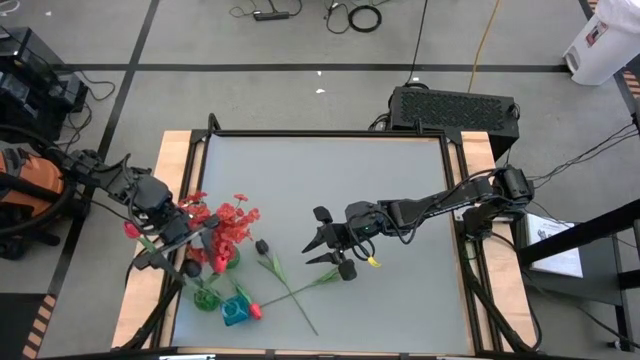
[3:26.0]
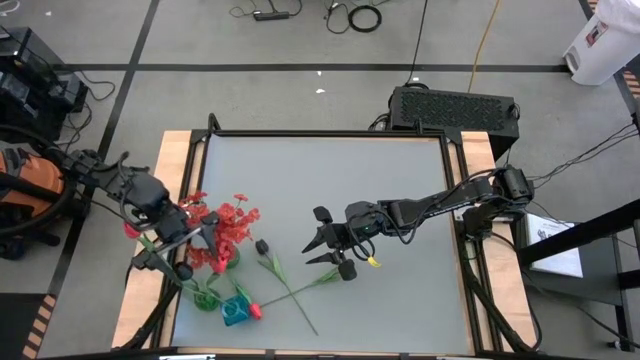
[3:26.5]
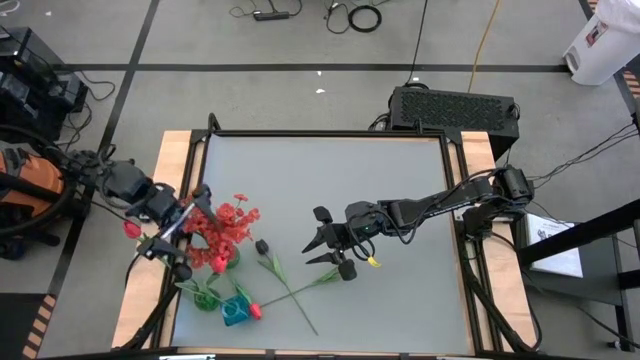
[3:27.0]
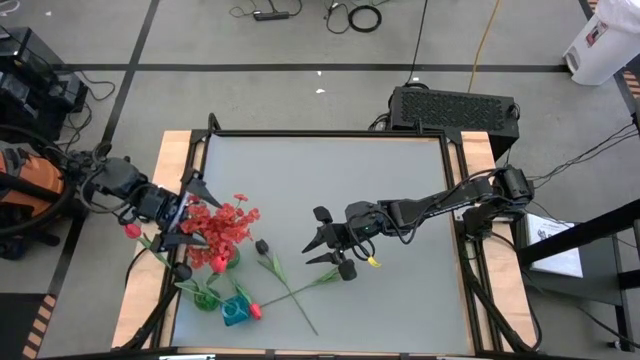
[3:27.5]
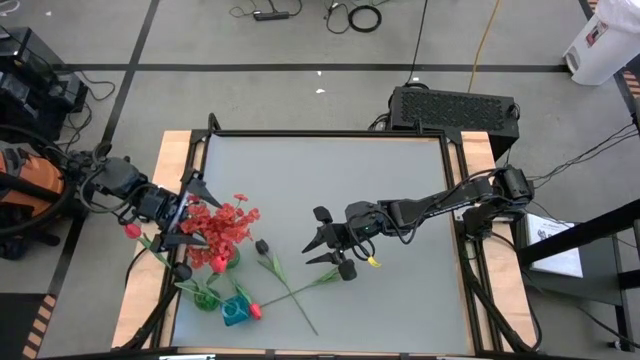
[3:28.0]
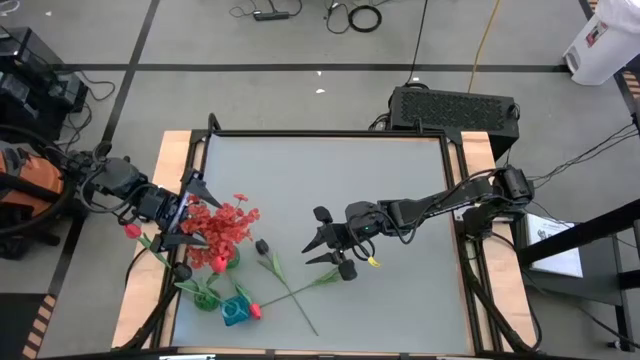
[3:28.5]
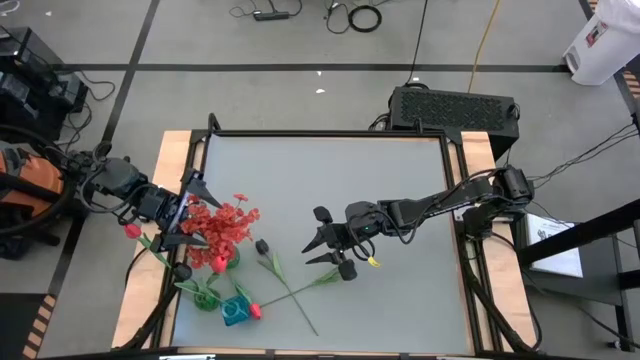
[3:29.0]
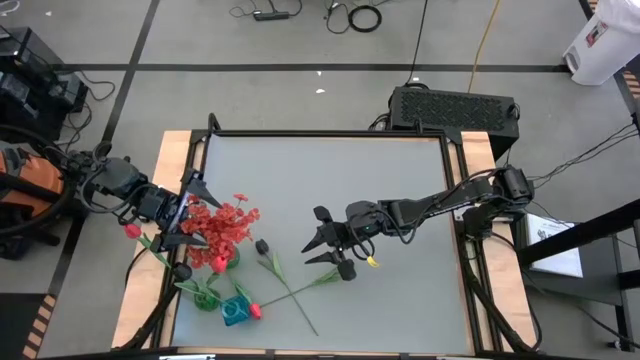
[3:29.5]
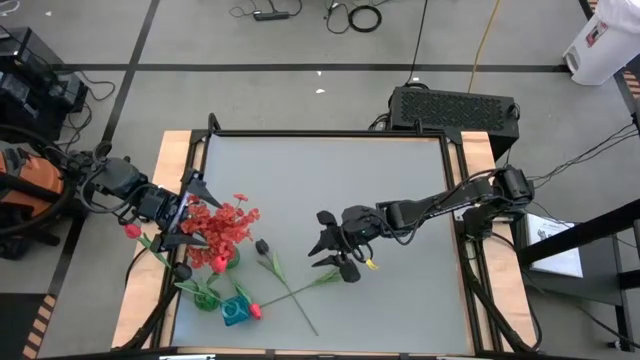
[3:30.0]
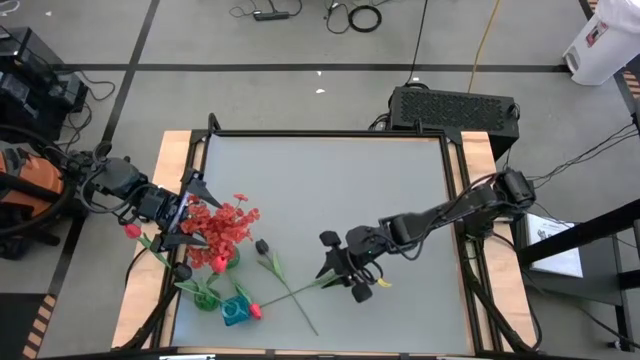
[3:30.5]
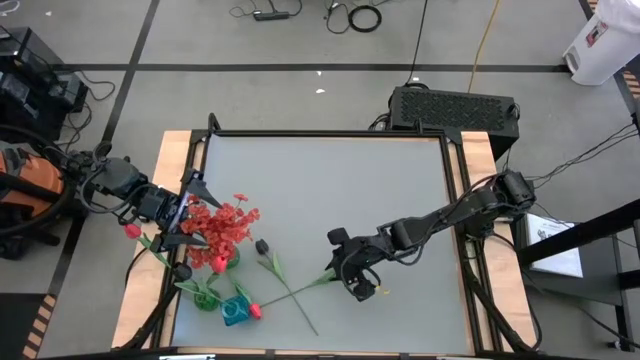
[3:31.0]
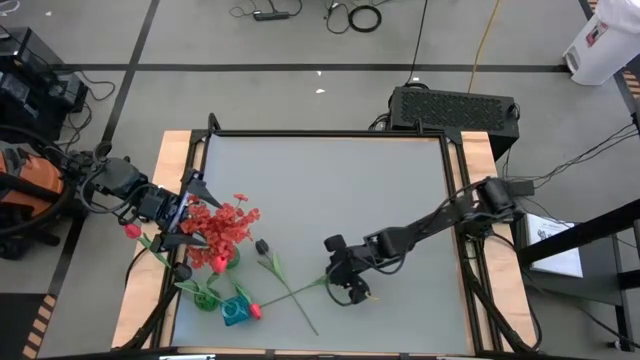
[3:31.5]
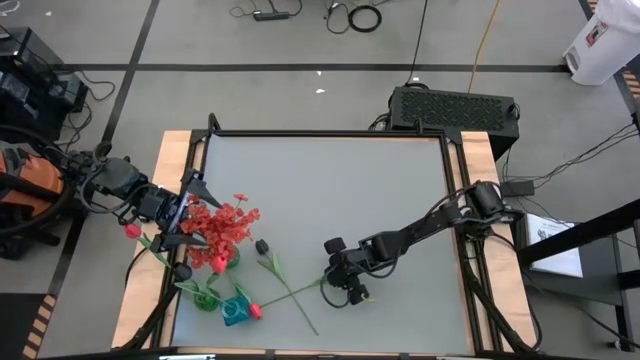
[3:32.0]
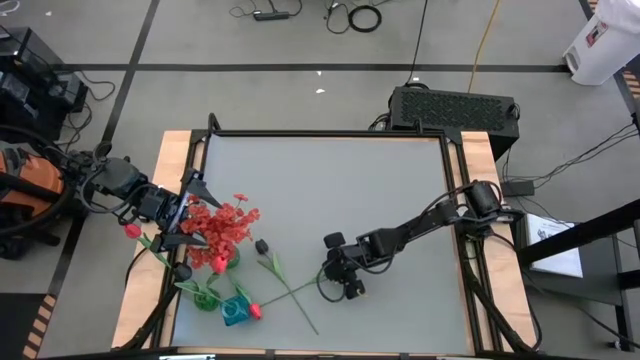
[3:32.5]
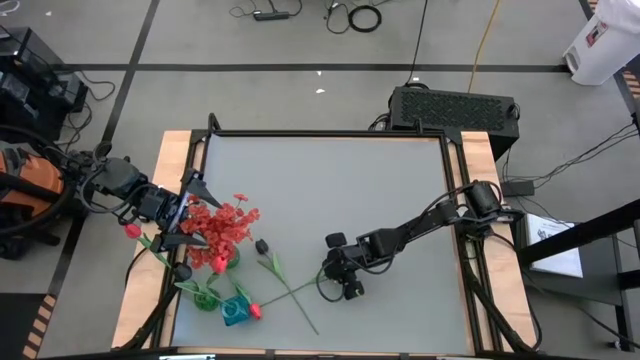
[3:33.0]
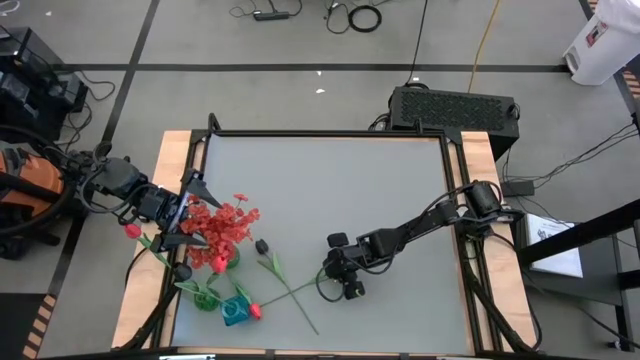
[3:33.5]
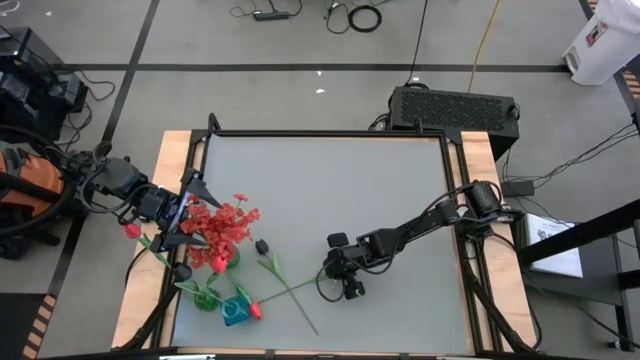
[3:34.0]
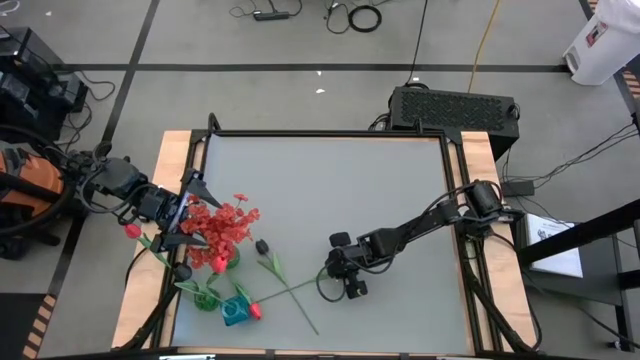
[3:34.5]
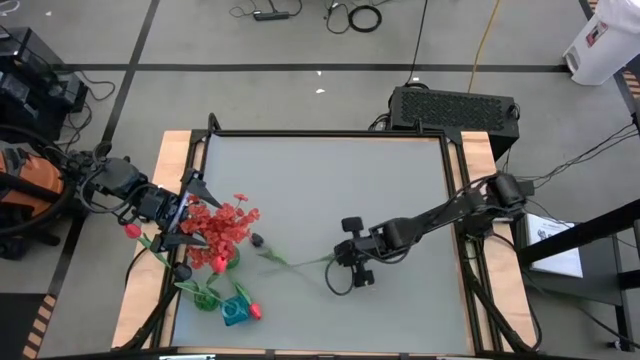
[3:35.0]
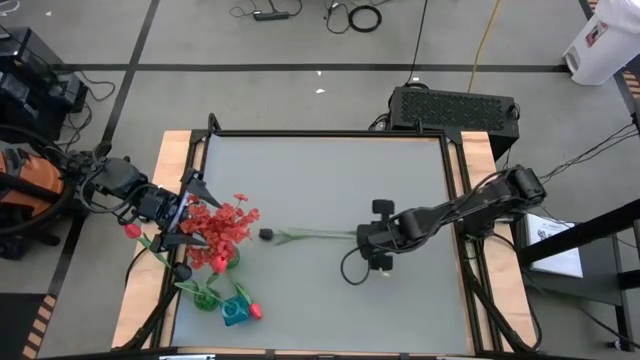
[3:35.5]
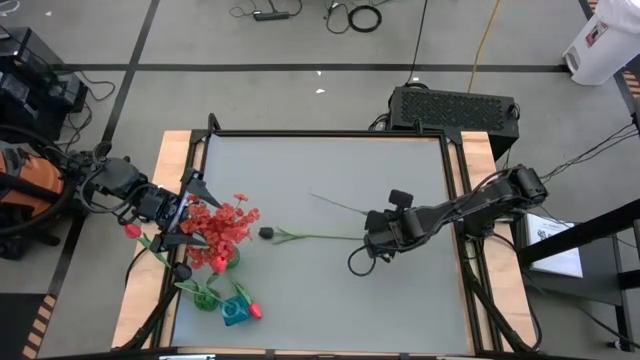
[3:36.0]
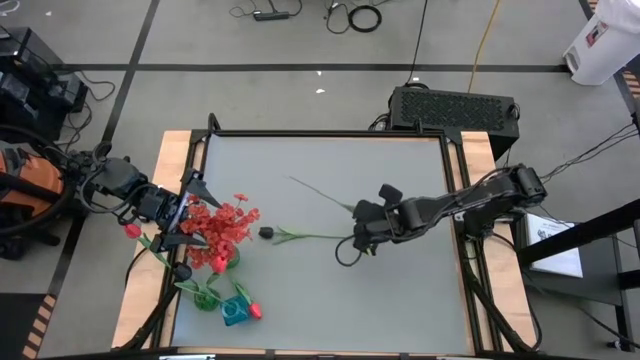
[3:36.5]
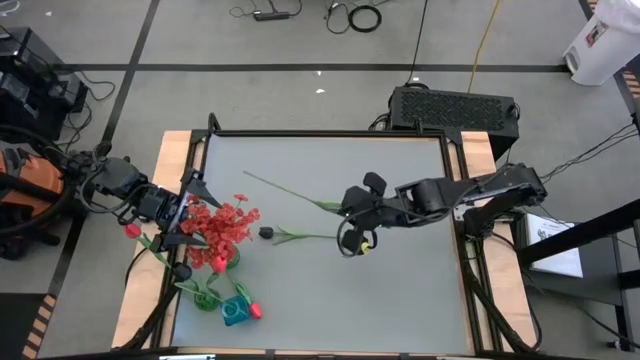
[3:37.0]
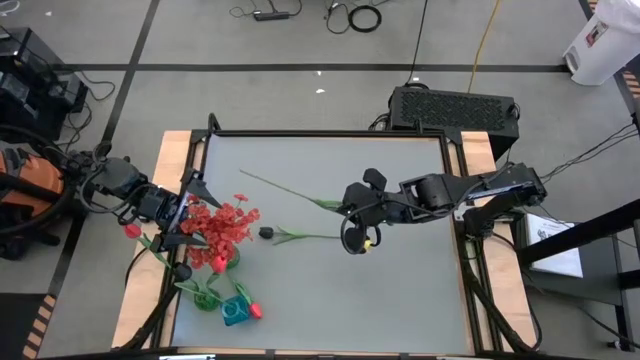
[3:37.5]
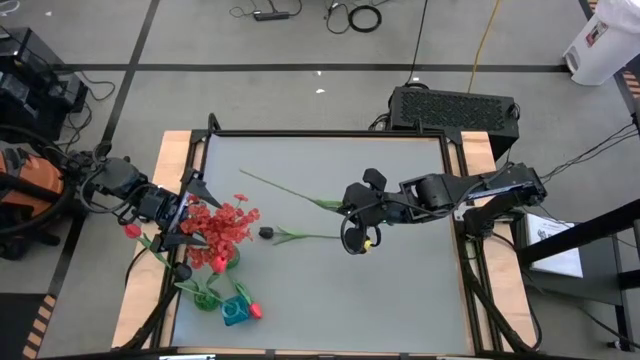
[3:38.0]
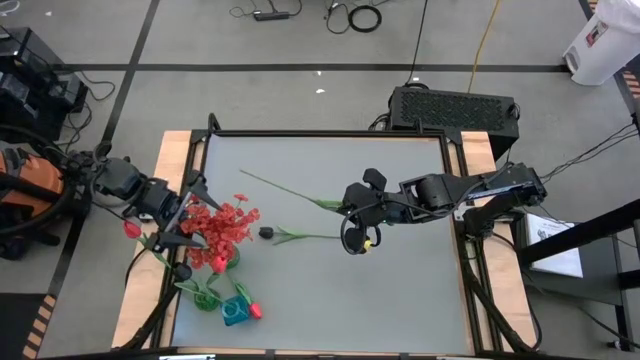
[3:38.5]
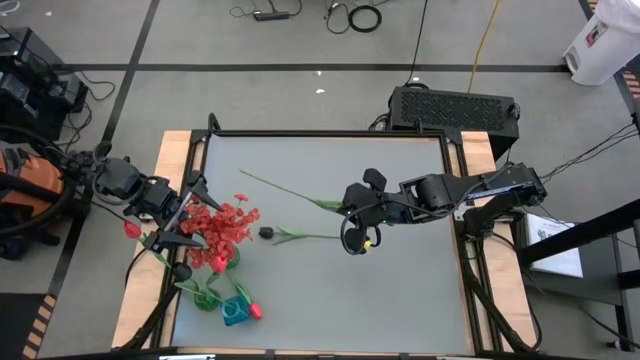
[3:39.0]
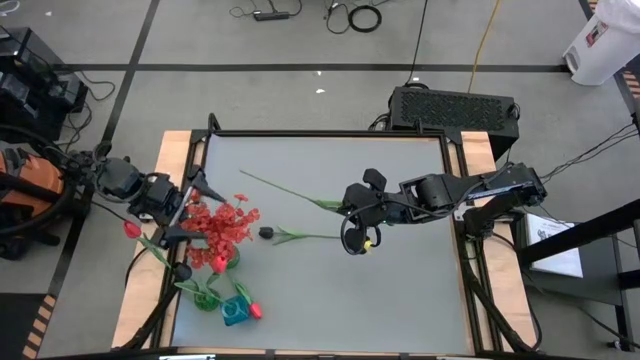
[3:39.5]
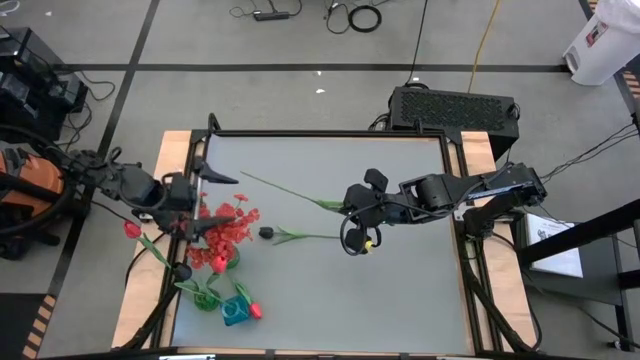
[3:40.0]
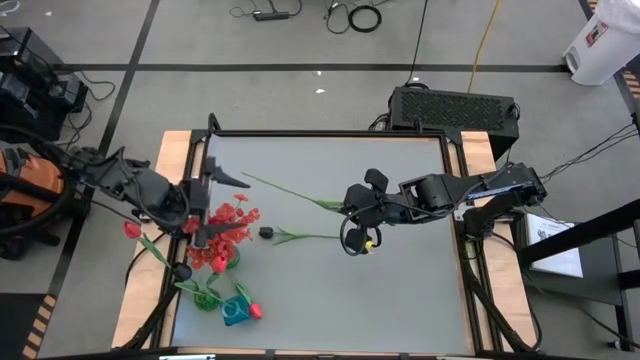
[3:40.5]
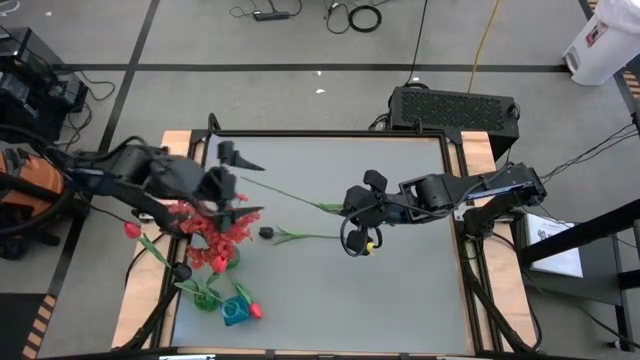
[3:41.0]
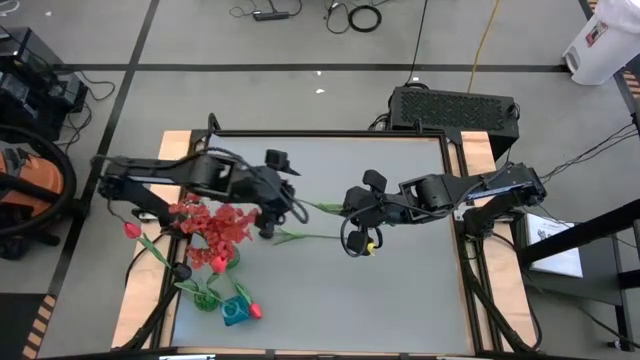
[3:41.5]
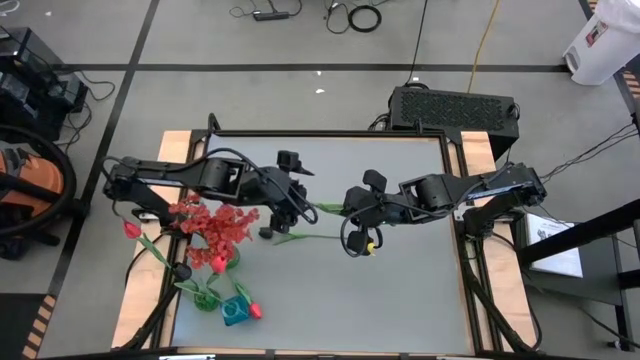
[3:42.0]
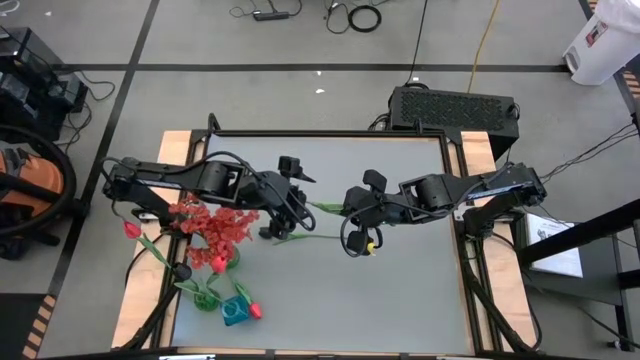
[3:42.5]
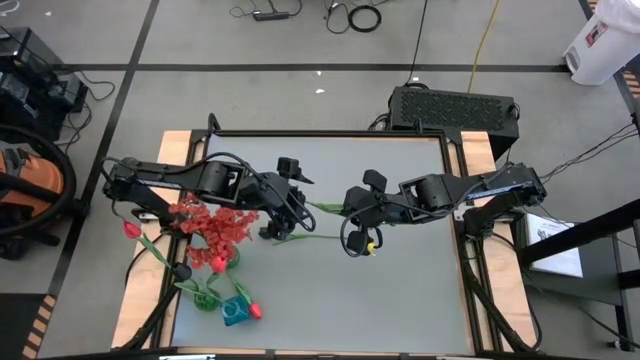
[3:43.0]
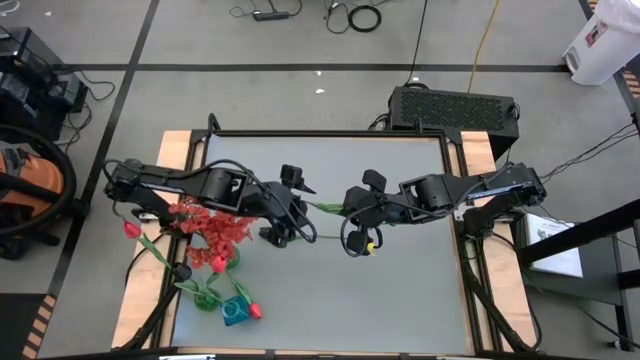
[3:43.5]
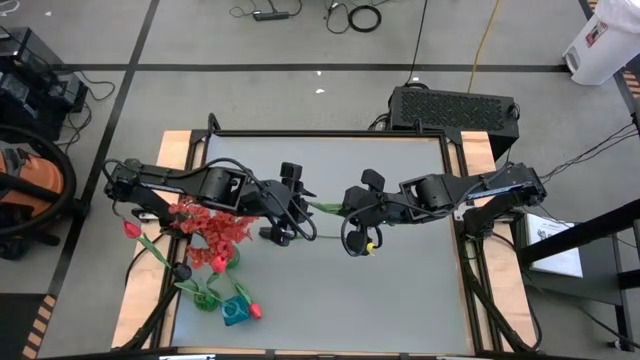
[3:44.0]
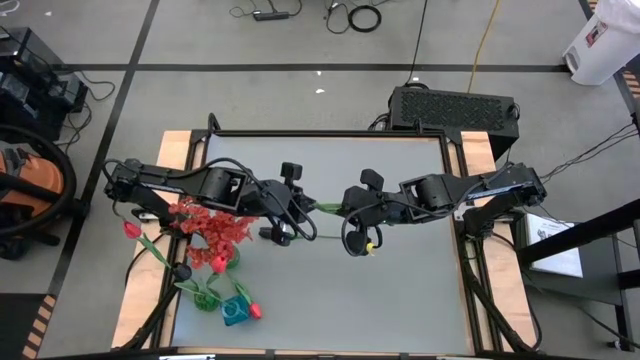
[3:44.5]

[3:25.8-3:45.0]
Task: Sort flowers into vase by color
Put the right black flower into the blue vase

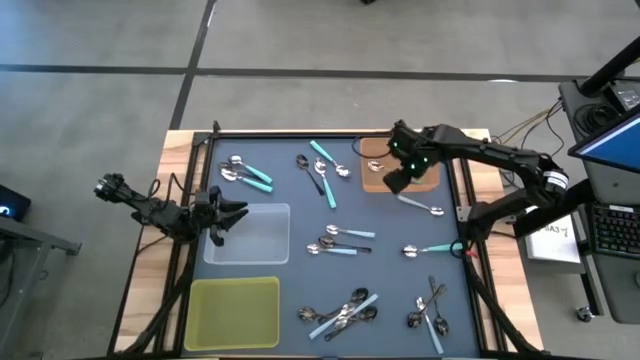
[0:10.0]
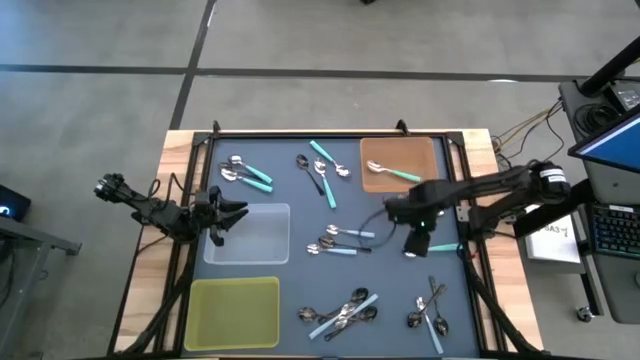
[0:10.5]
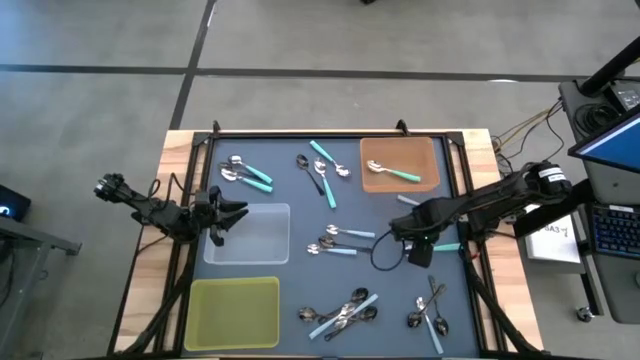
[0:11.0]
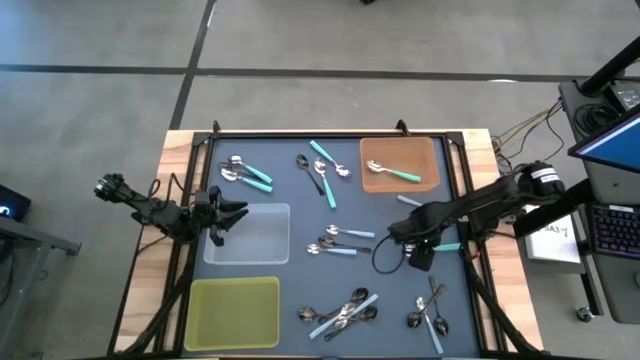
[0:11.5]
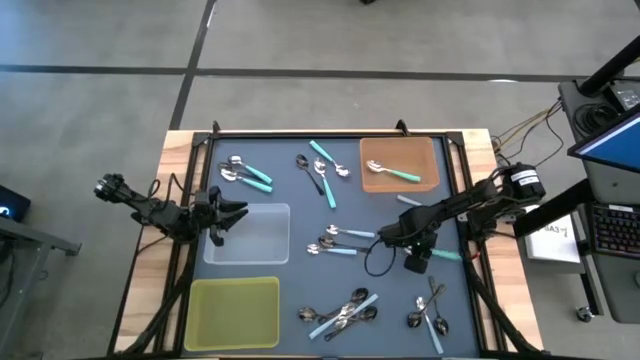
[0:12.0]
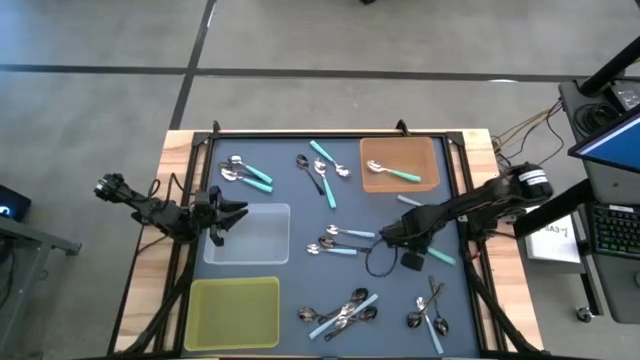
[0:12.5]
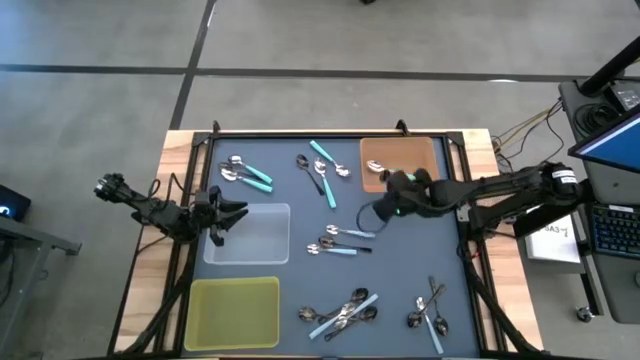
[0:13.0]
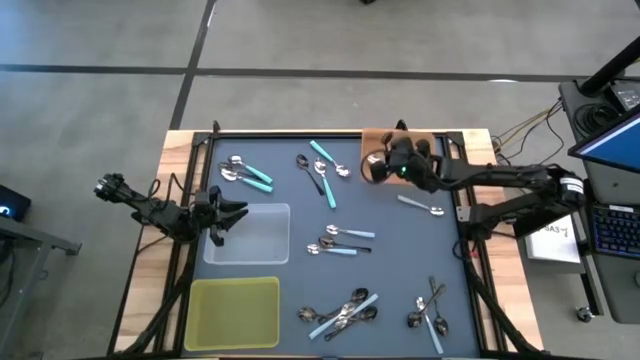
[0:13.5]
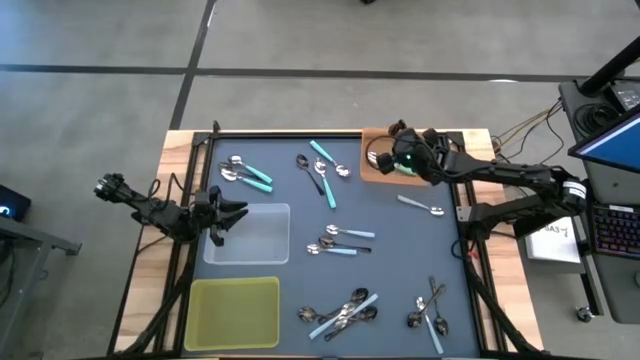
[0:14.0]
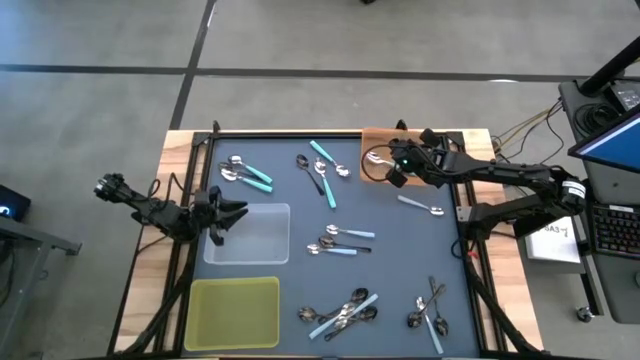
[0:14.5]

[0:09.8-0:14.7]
Task: Sort silverware by color (type)
Put the green spoon into the orange bin
